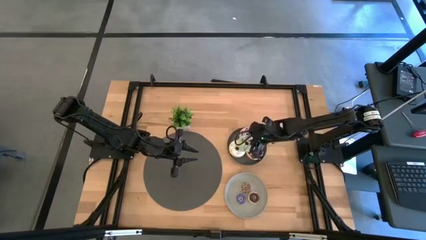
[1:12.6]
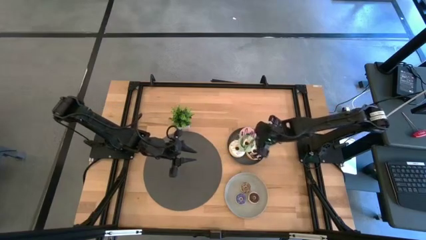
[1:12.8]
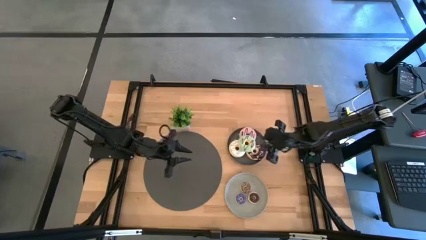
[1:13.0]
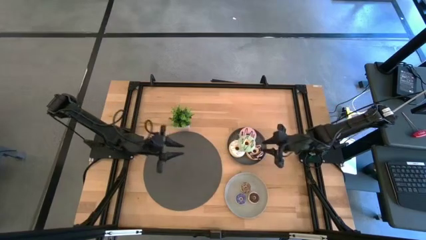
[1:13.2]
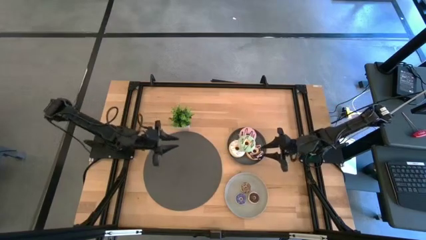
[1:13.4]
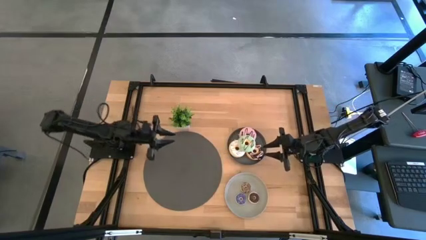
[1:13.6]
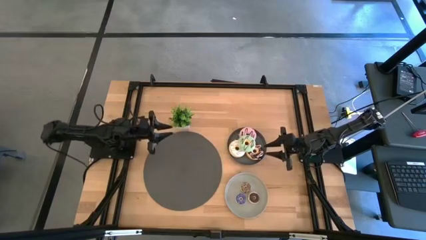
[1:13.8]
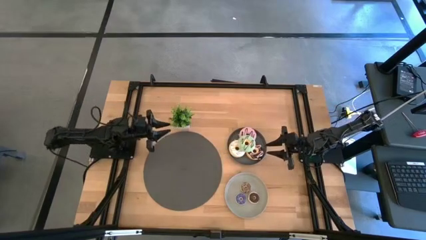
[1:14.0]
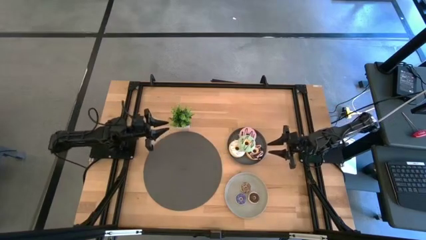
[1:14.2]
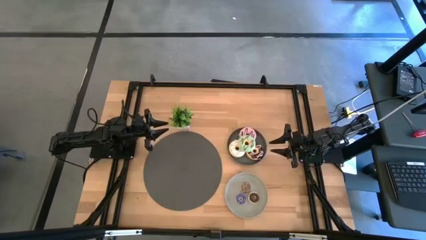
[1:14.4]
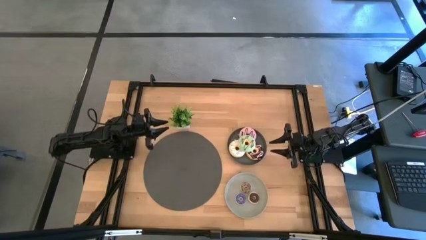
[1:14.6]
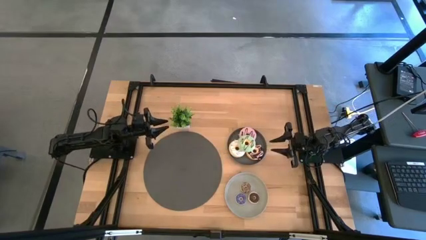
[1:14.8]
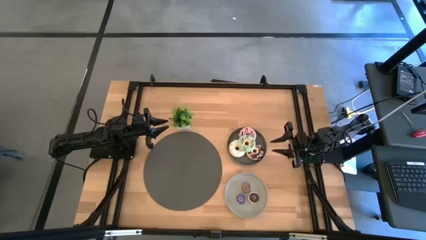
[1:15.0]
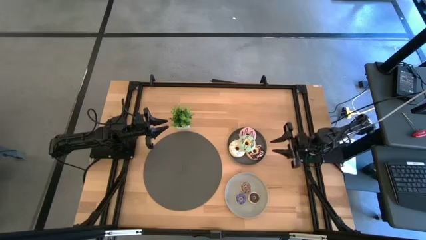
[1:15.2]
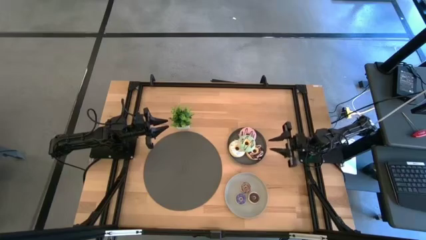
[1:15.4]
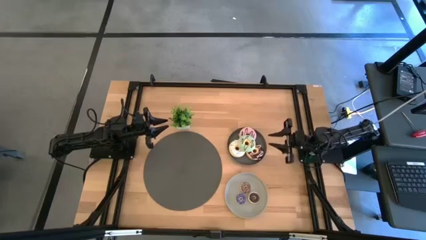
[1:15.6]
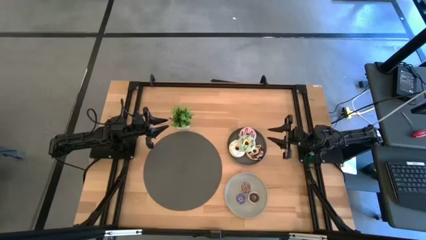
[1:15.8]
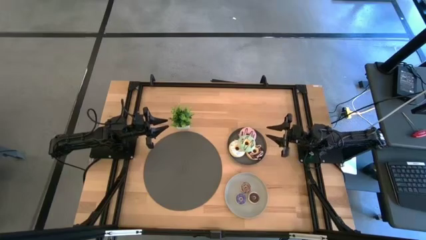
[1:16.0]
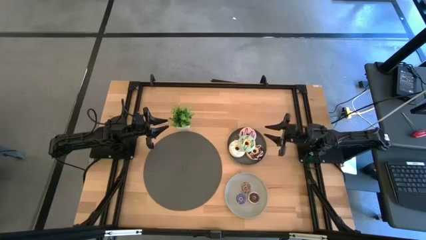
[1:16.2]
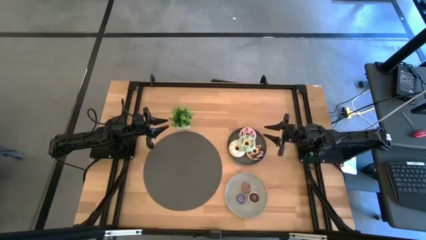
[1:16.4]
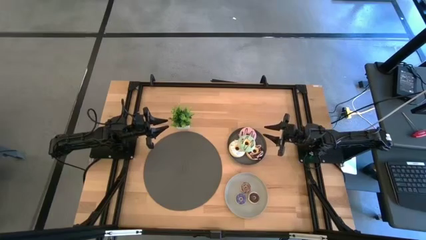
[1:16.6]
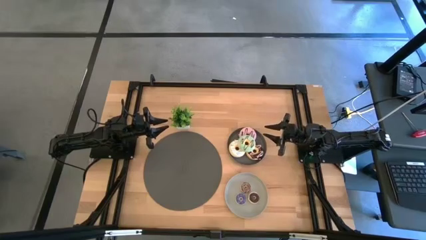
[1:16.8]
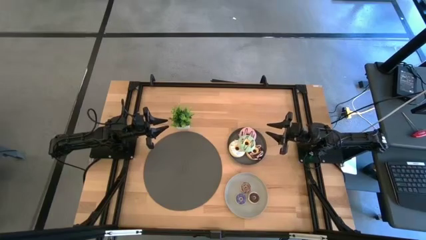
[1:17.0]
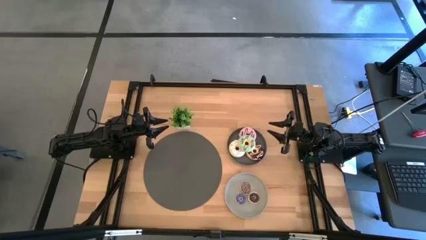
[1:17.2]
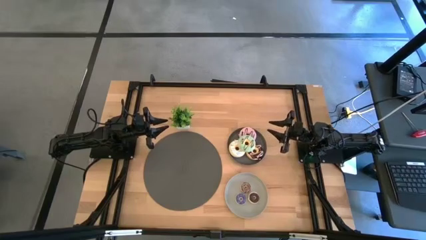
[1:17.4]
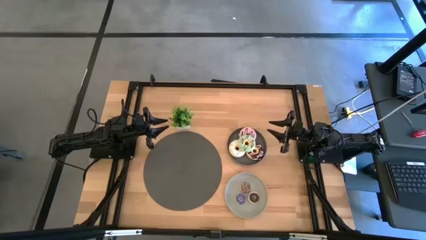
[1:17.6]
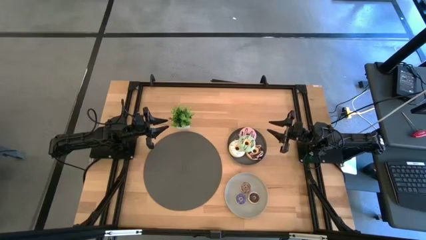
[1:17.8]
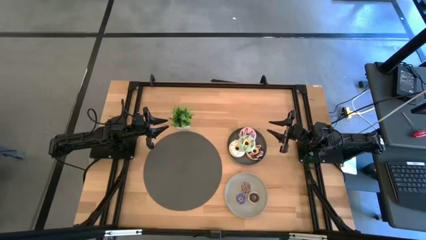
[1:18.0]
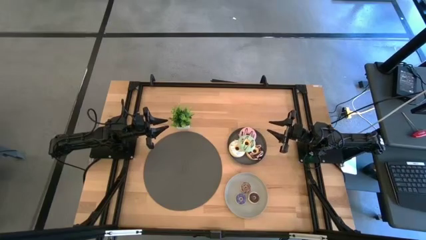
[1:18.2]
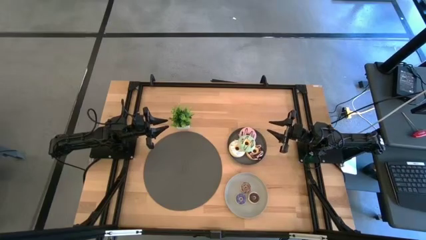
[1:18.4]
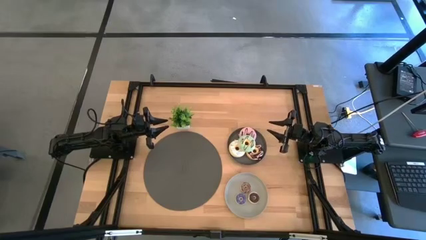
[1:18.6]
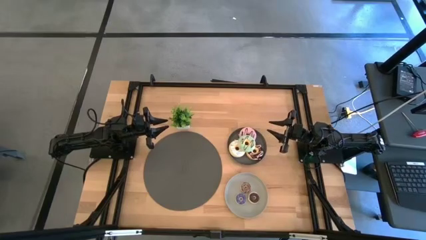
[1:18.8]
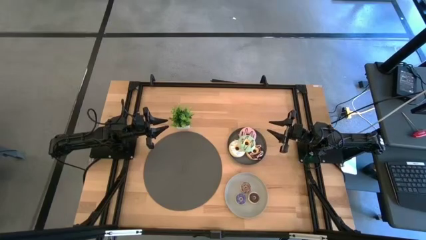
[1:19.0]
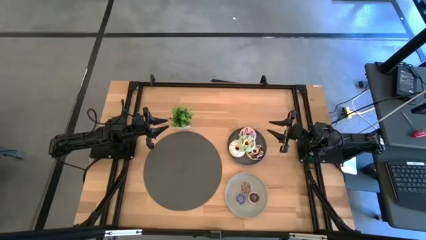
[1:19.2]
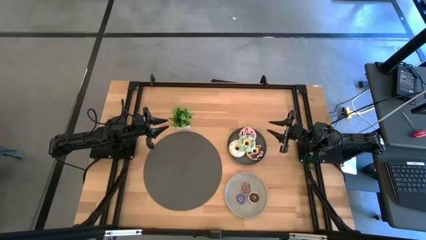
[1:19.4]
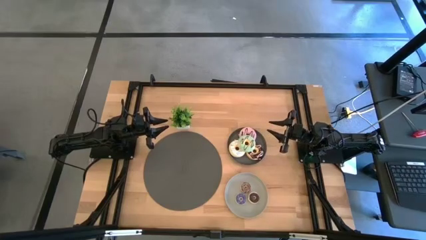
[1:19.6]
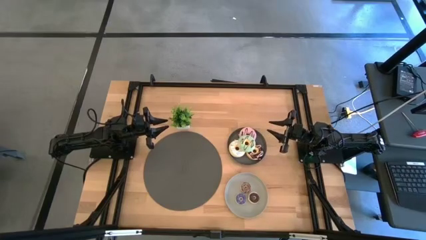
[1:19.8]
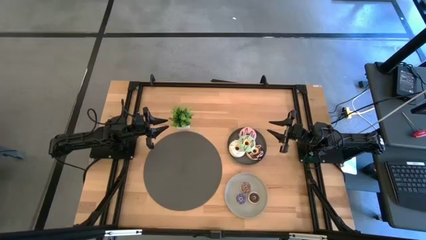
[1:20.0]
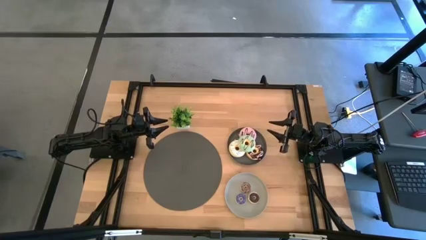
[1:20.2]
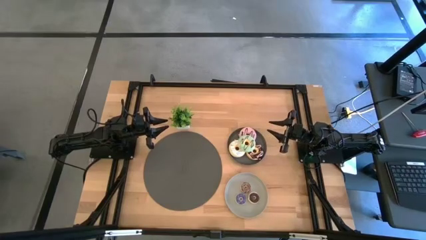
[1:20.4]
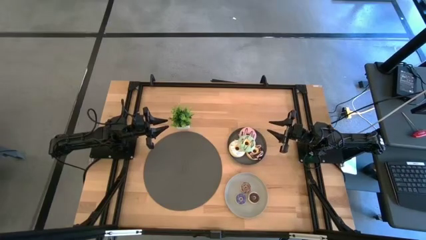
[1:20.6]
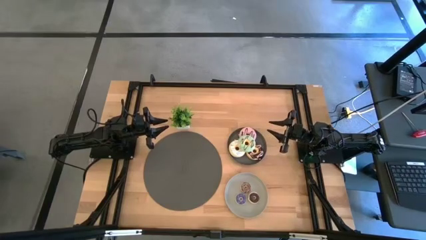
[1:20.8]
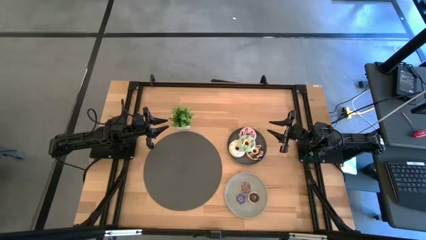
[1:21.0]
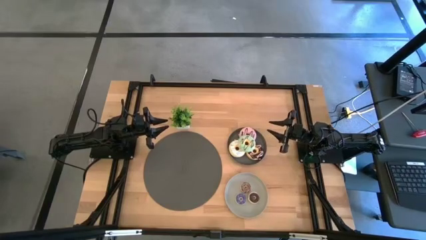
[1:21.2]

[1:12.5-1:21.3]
Task: Pick & Place donuts
Return to Home Position

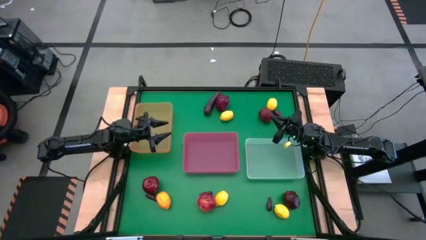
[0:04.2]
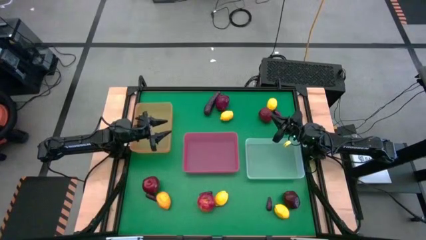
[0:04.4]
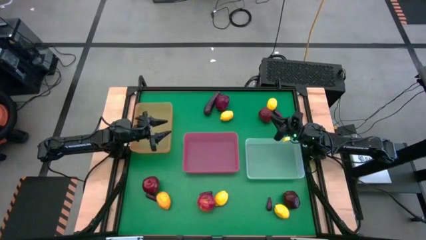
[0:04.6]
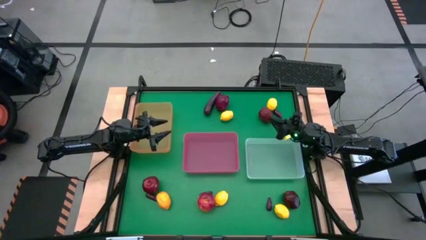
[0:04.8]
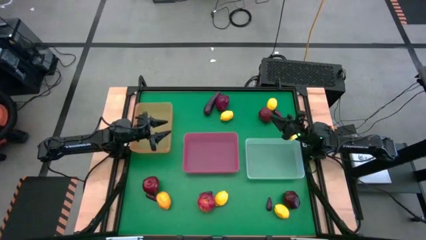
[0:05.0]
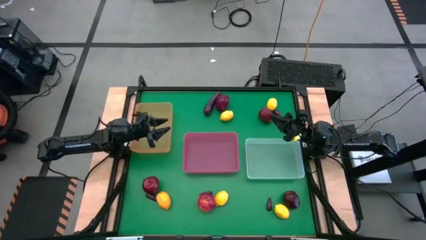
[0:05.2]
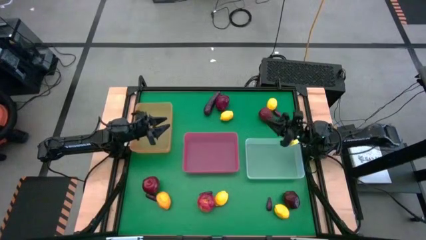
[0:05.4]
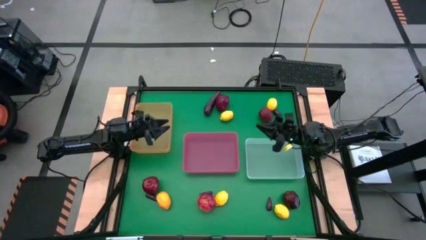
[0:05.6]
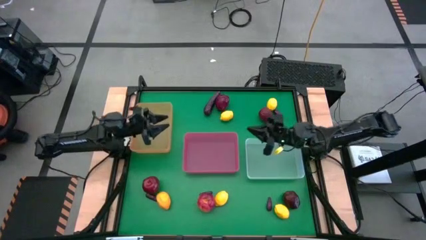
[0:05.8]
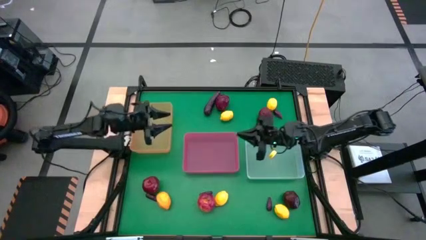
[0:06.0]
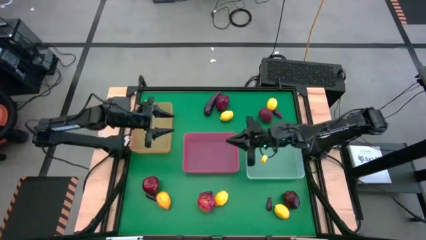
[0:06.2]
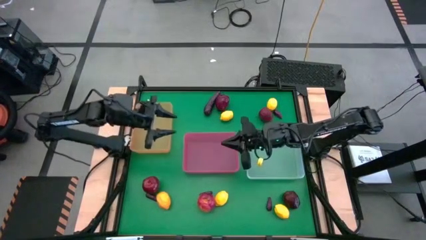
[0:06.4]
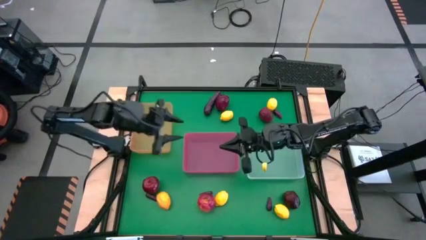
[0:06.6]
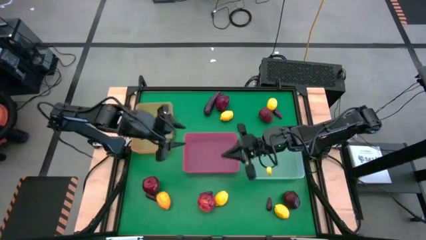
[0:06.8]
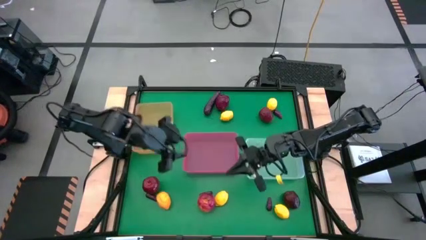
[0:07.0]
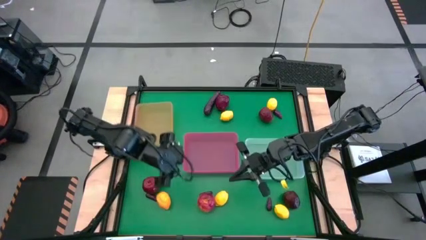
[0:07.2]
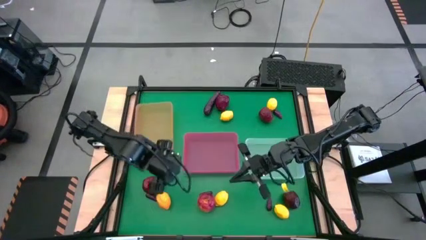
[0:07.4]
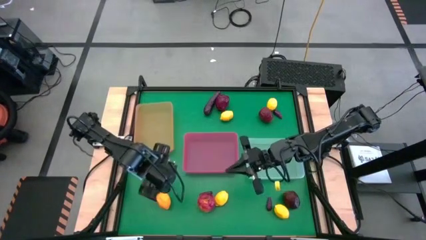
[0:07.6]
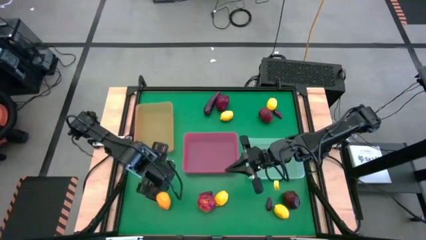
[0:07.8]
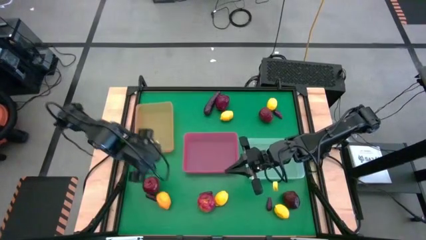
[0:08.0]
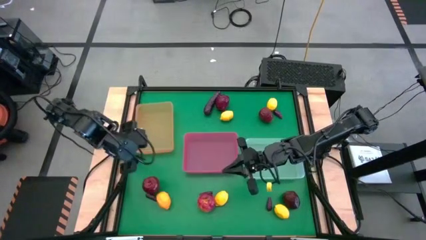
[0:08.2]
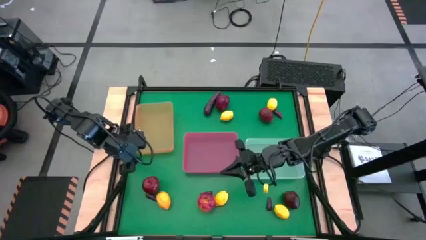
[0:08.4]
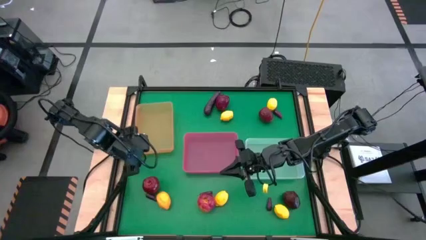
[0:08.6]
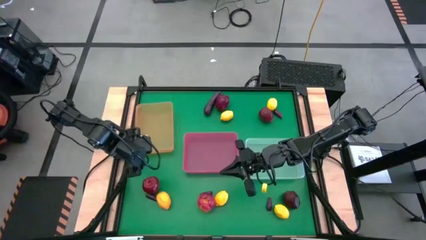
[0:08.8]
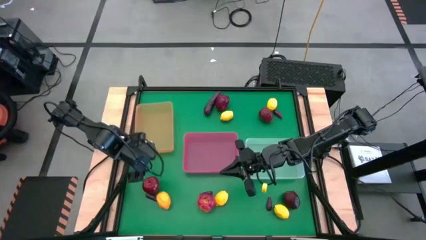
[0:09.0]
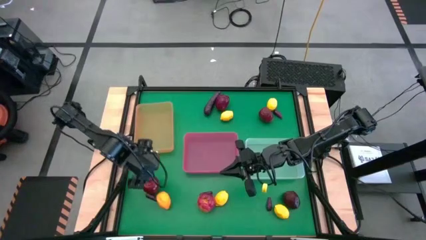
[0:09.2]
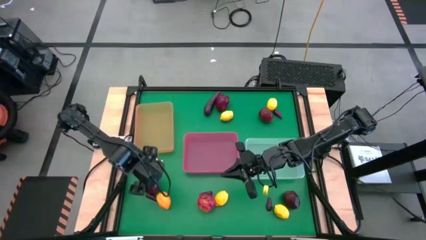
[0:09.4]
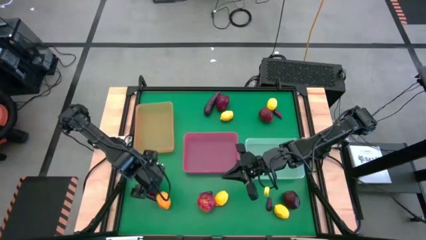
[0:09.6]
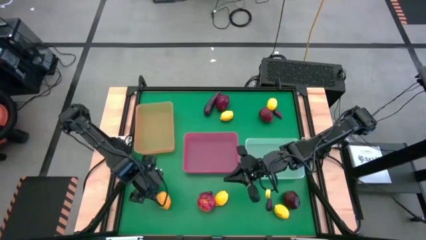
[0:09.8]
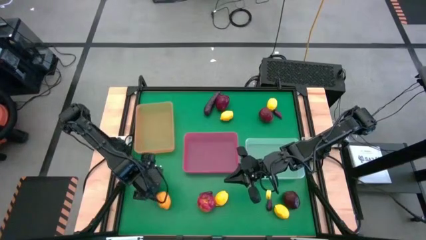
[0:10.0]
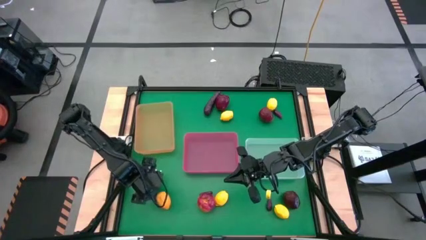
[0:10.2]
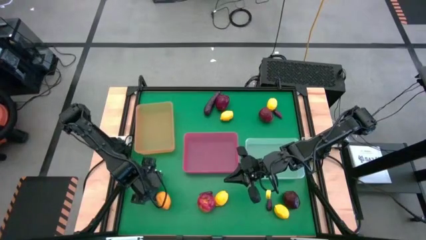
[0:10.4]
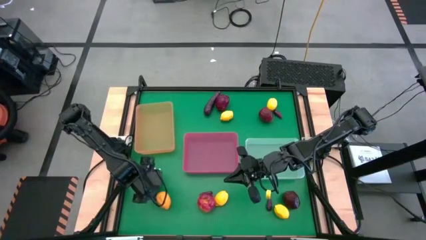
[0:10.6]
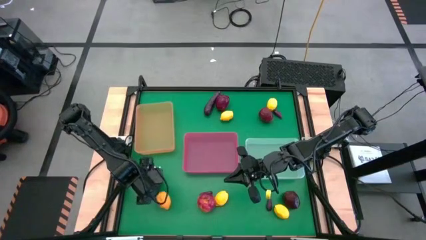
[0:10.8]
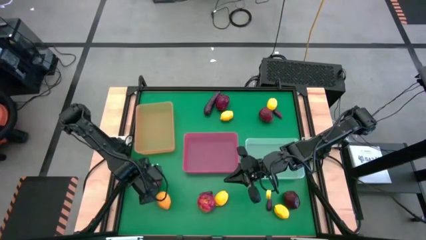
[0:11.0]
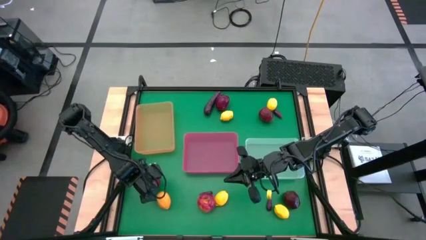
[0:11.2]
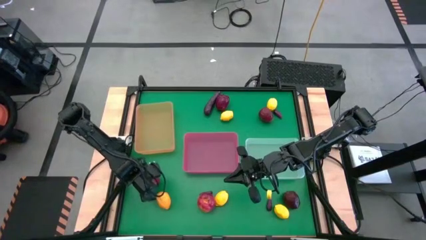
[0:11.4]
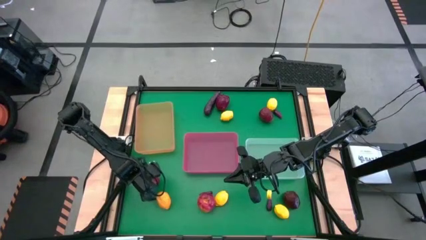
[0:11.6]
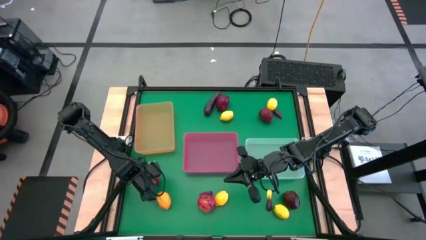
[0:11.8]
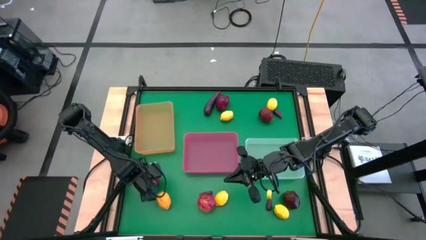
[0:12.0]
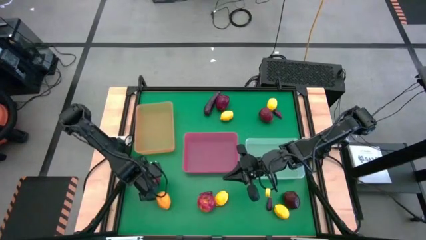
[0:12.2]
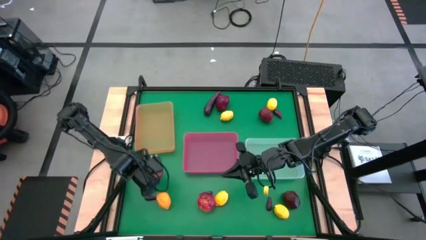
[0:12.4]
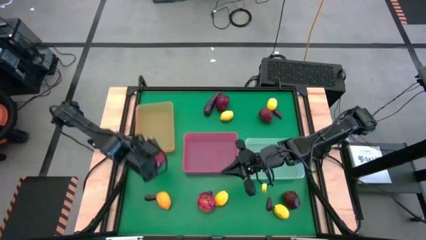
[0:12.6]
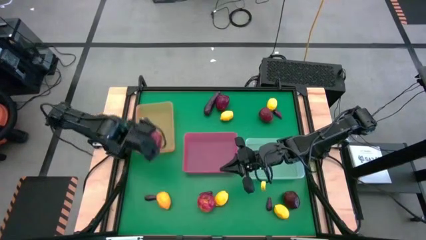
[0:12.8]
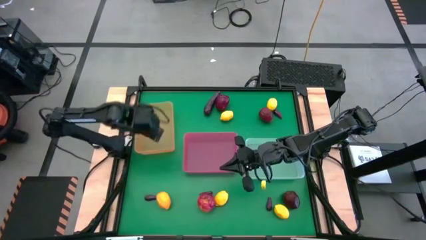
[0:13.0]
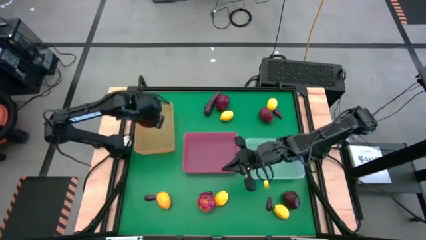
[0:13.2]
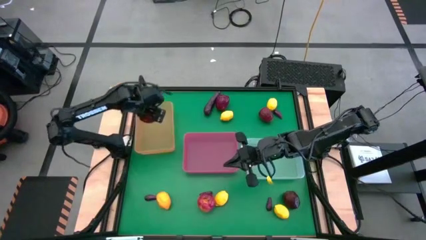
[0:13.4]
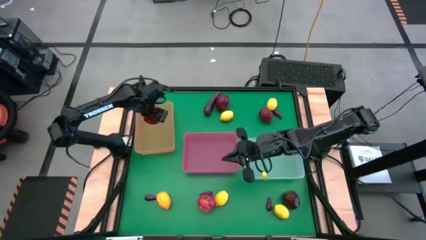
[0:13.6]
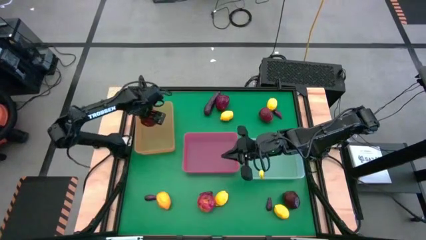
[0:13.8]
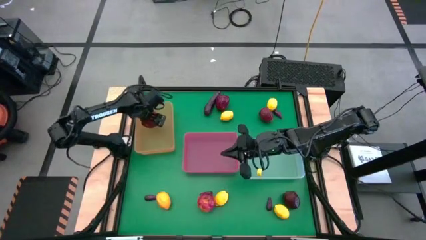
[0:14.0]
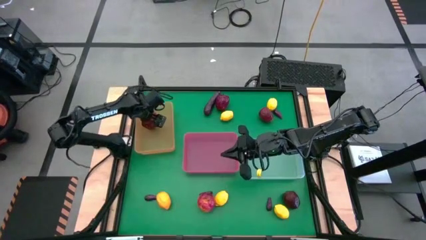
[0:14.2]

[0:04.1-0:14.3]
Task: Sort produce into baskets
Put the red apple into the orange bin
